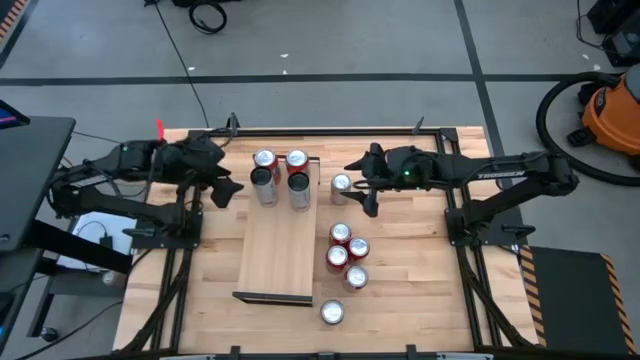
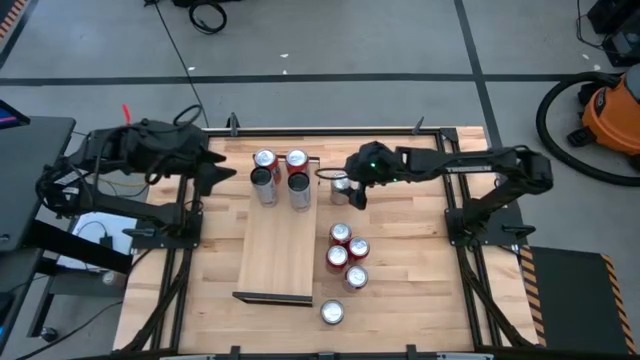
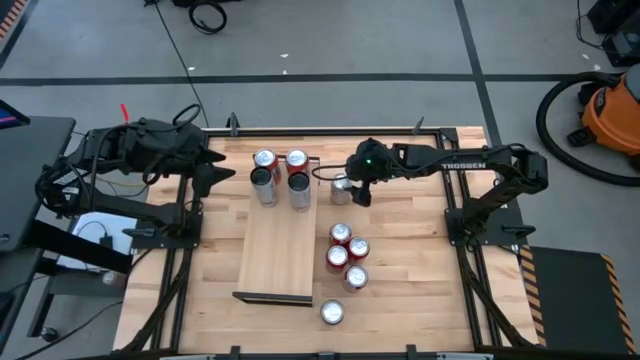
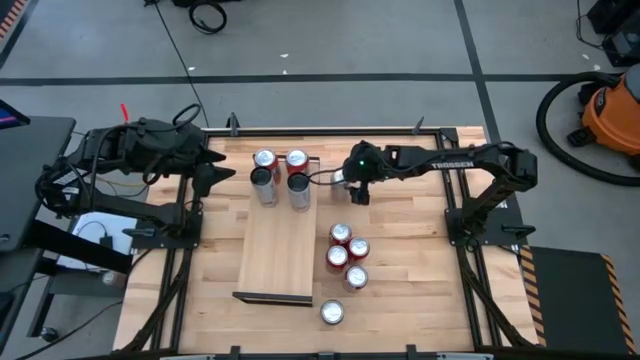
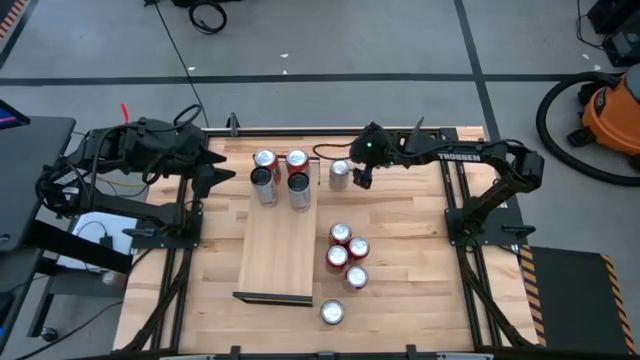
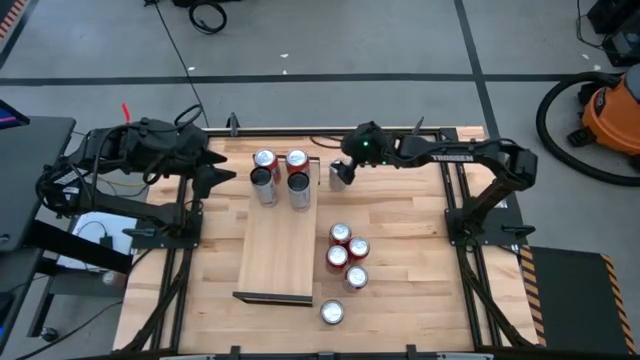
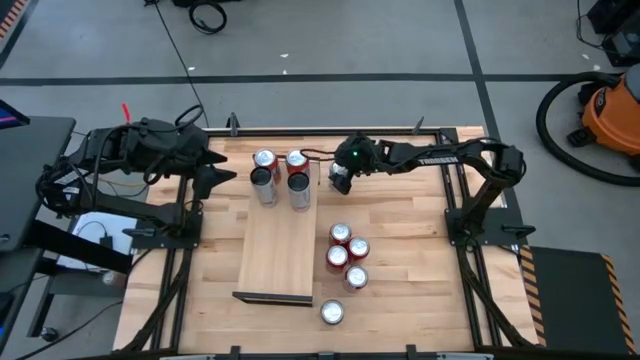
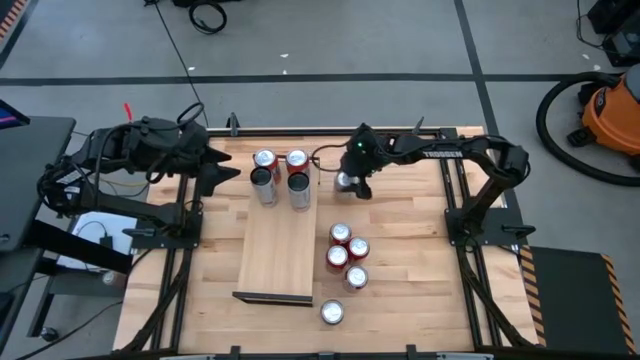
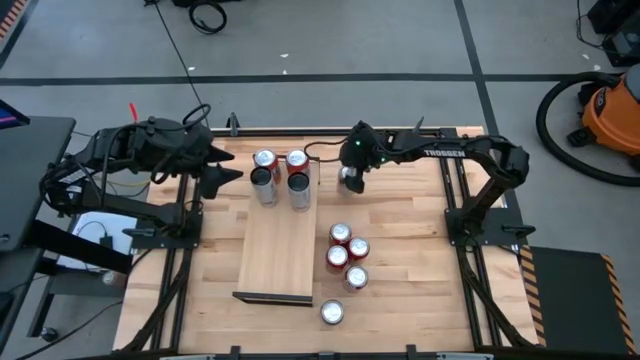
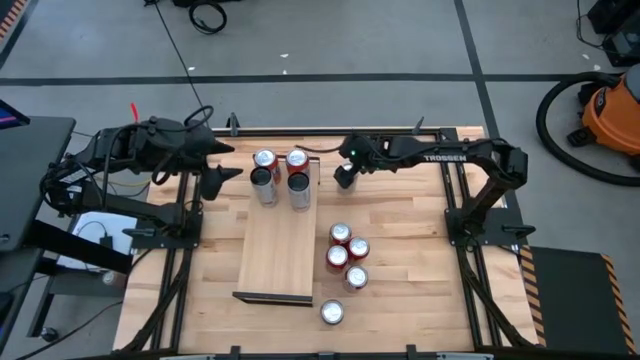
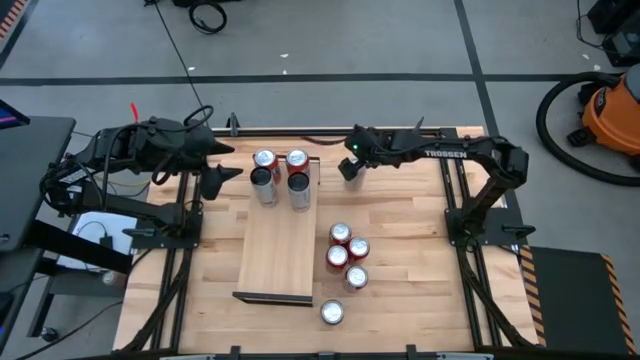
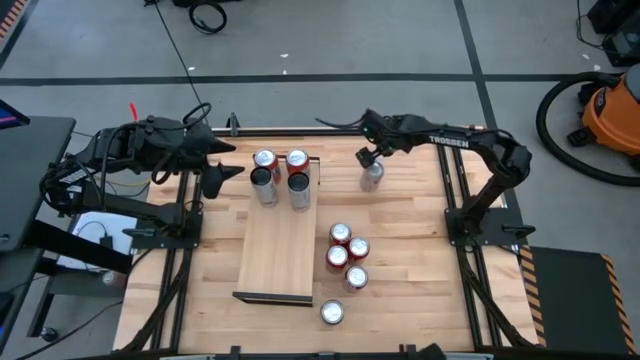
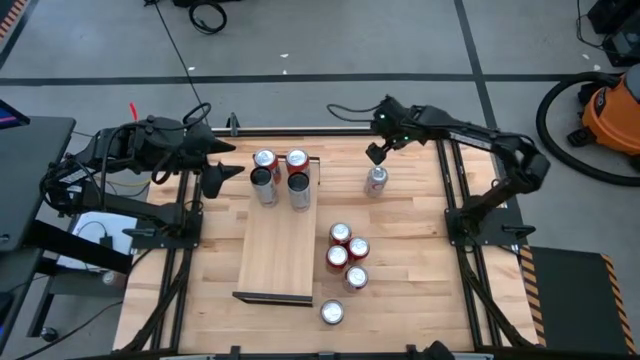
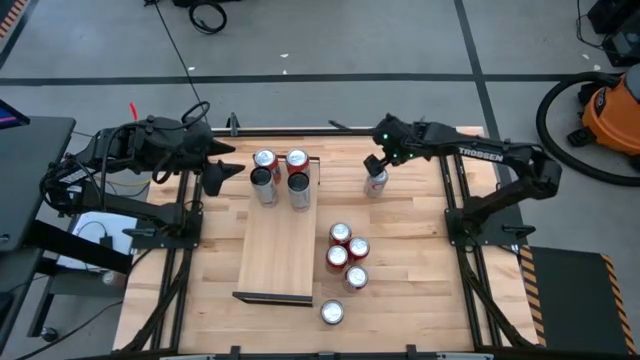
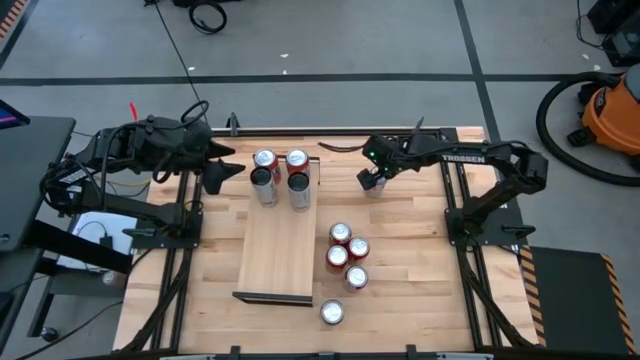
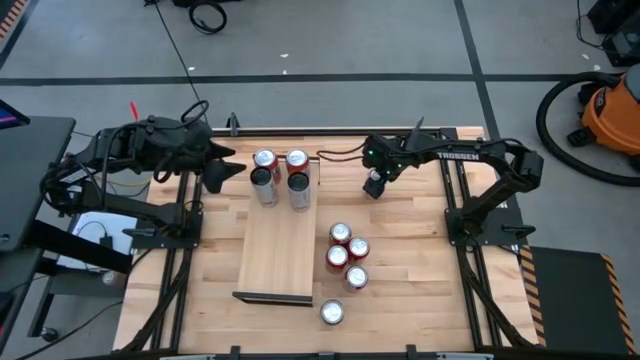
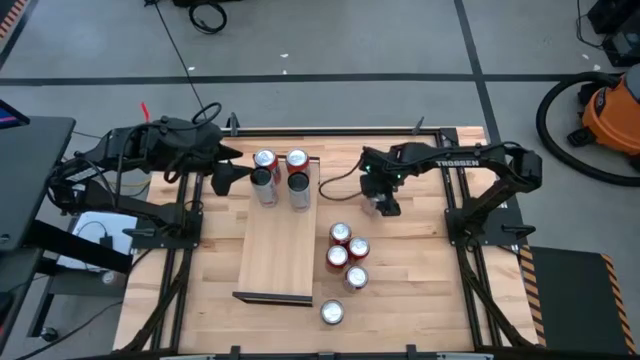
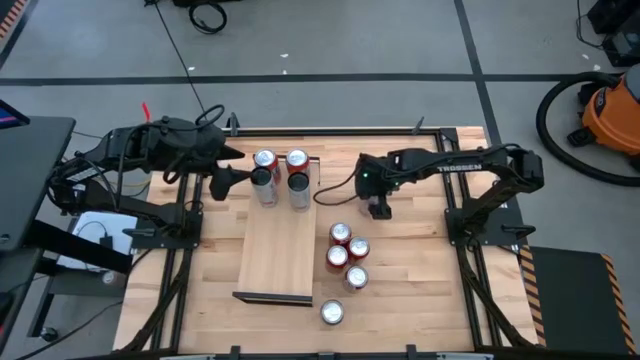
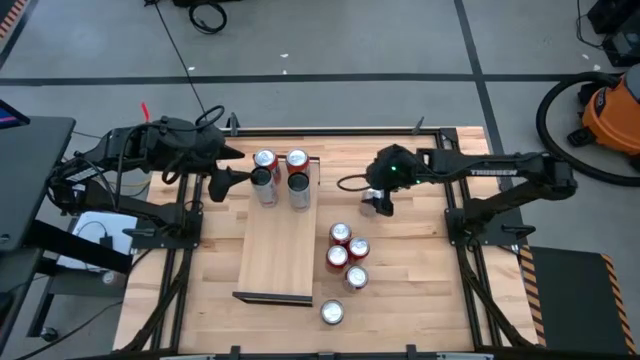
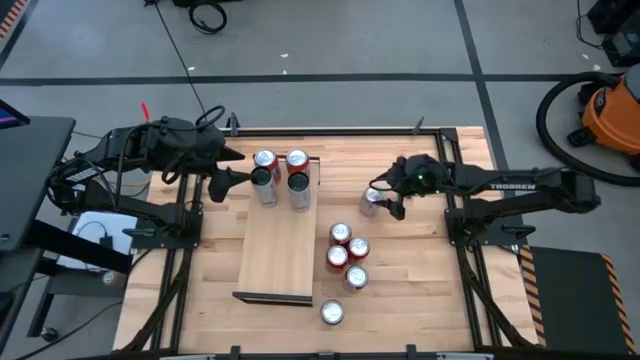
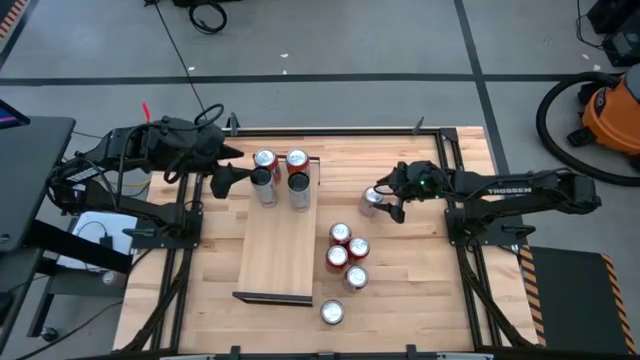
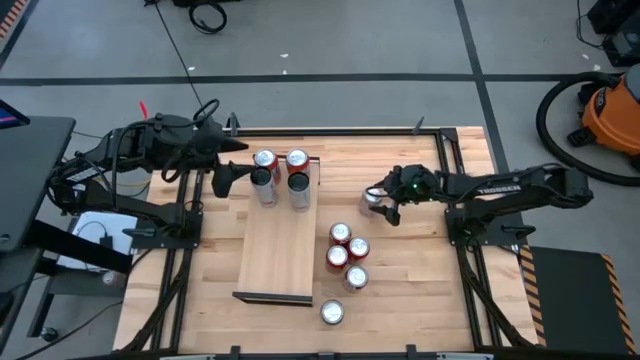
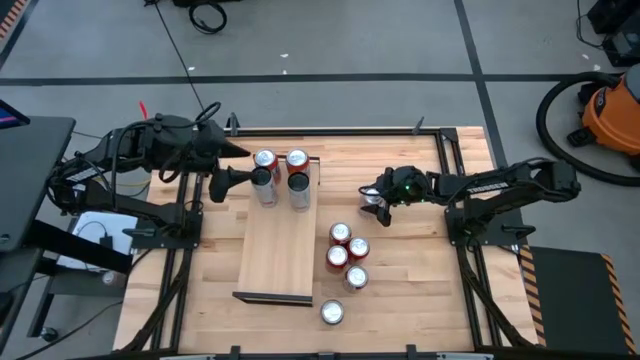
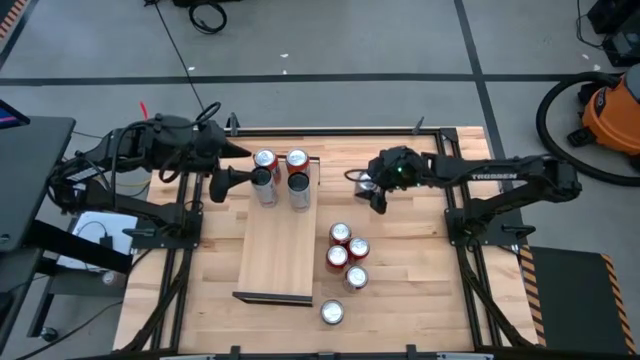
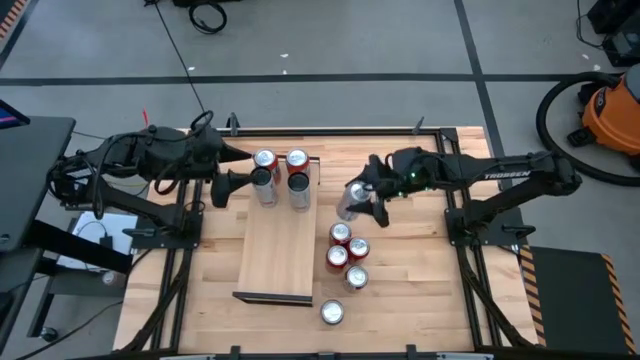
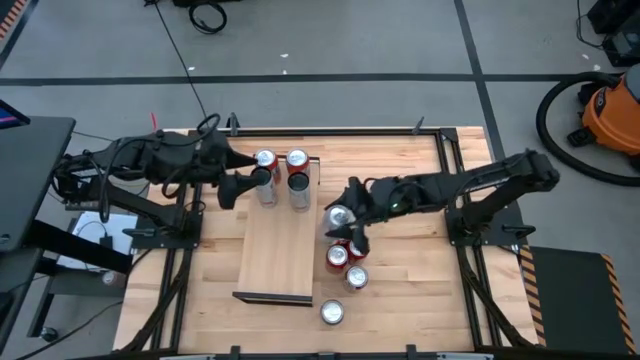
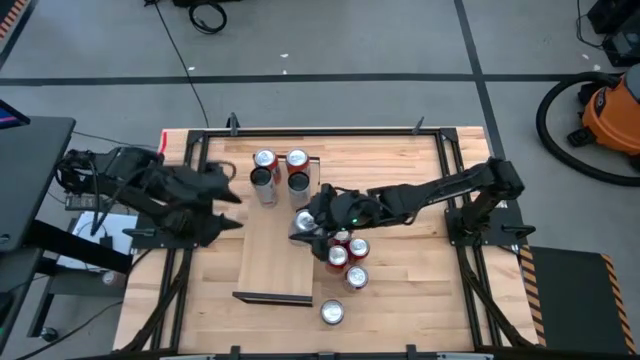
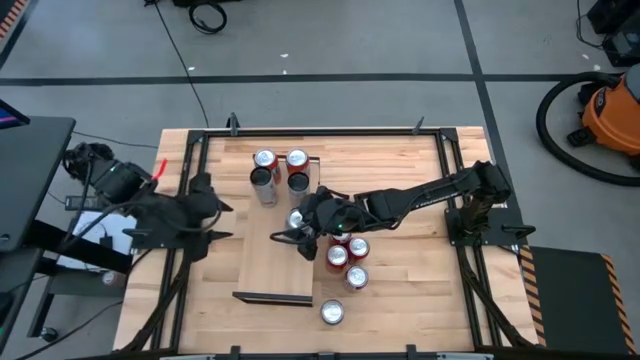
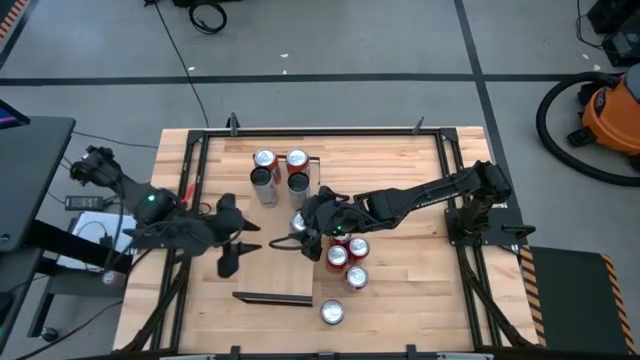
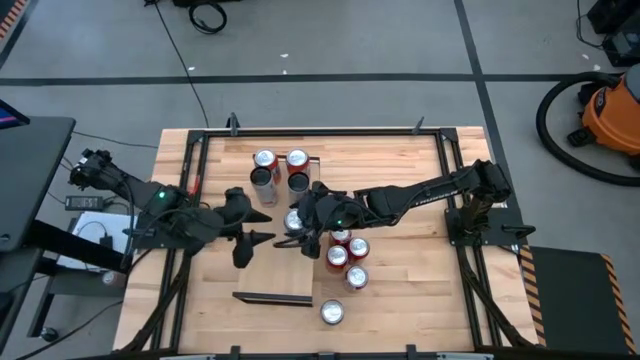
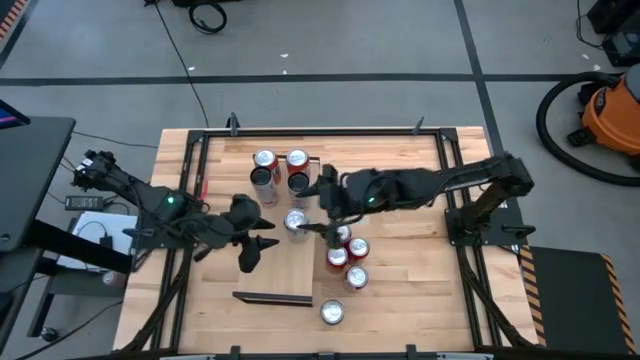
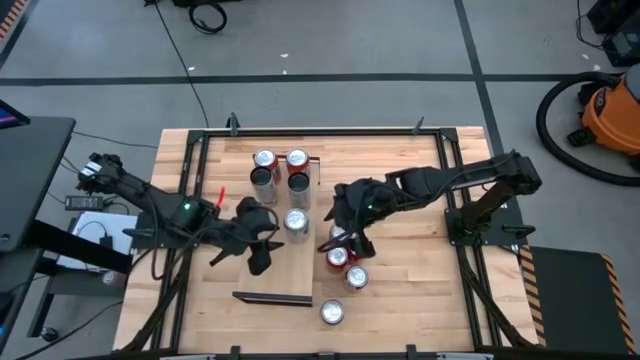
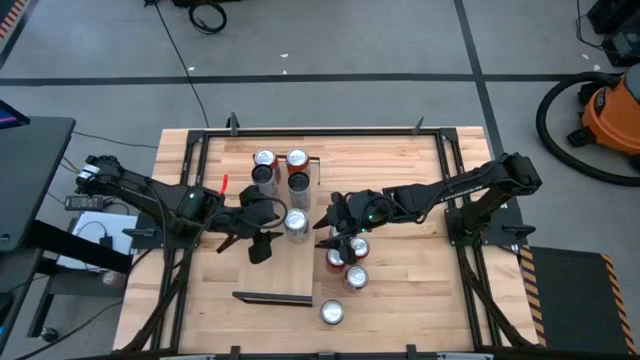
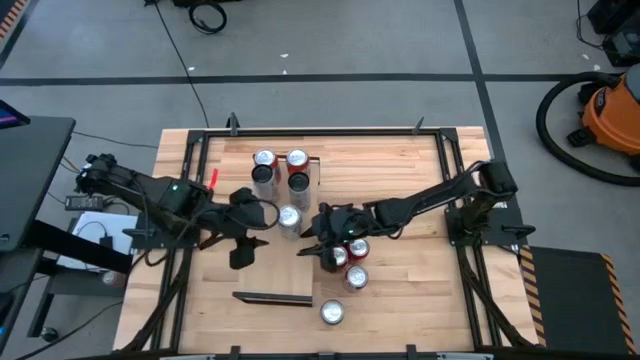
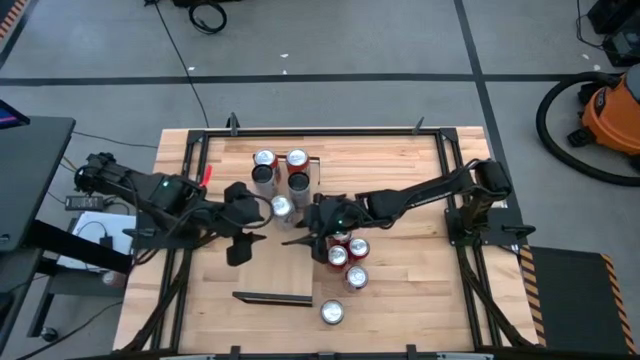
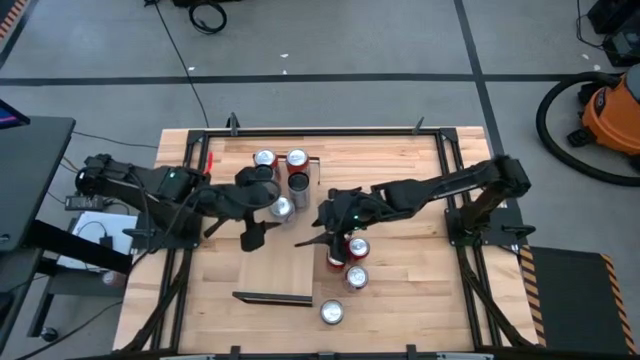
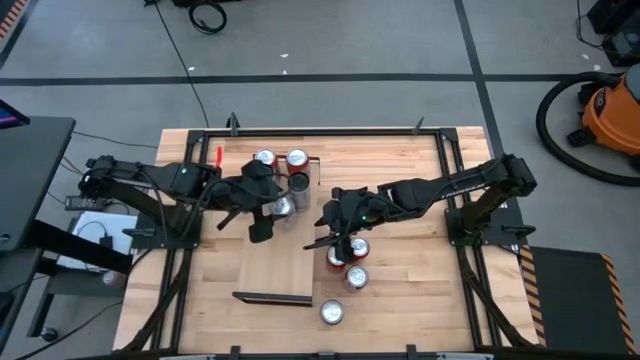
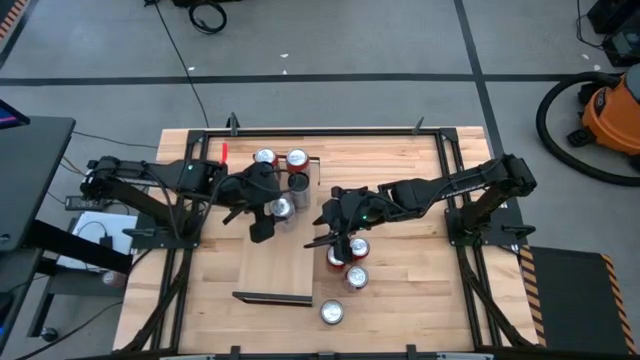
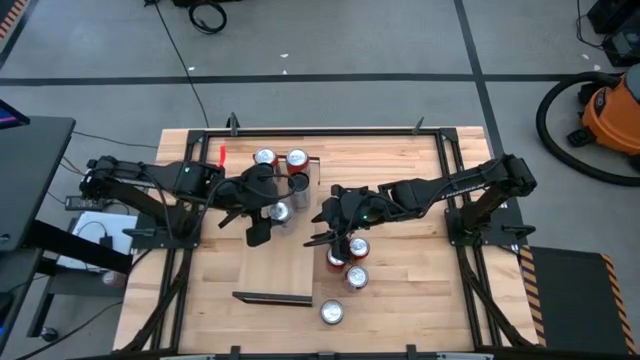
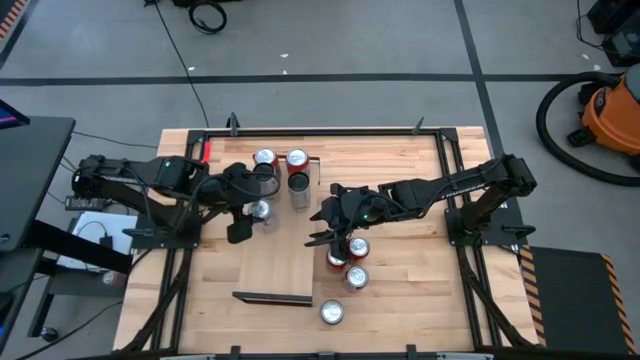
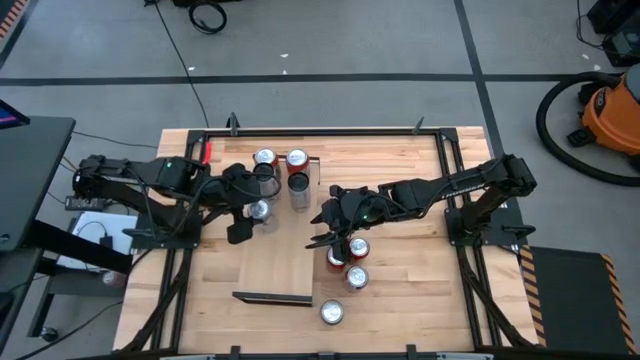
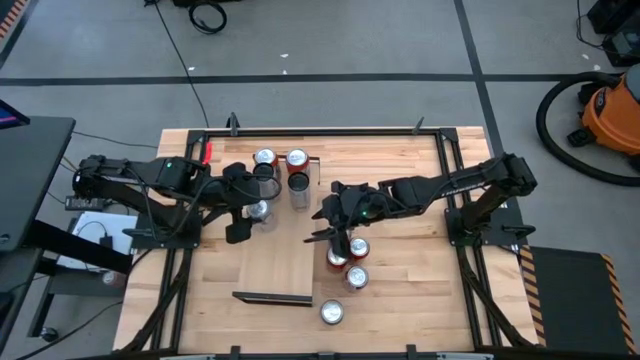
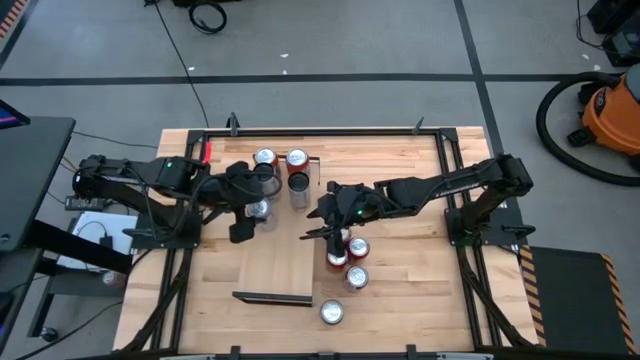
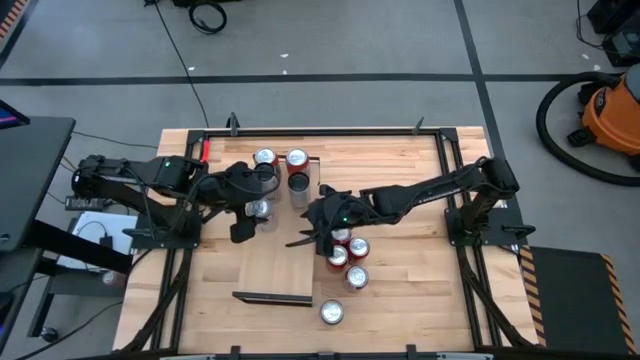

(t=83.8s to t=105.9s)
Task: Place canned beverage on shelf
Put the top red and silver soda can on the shelf

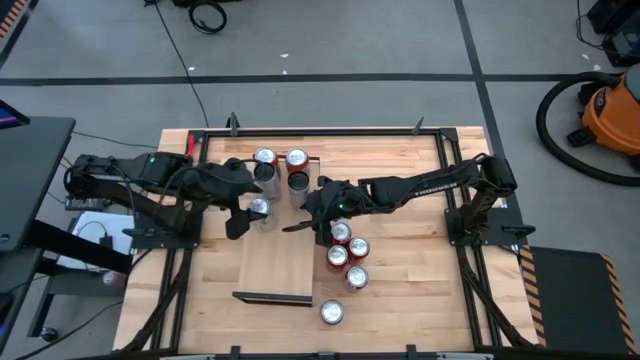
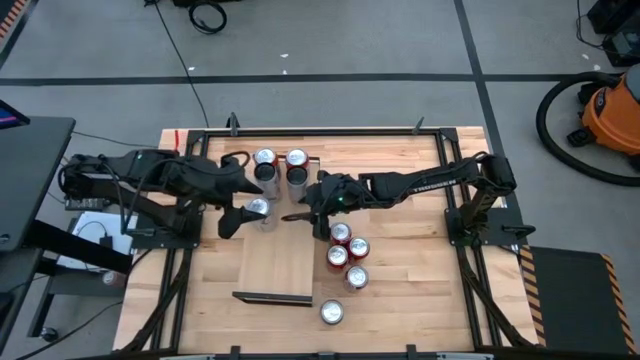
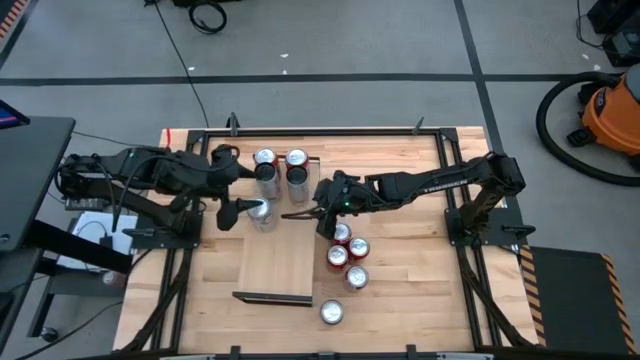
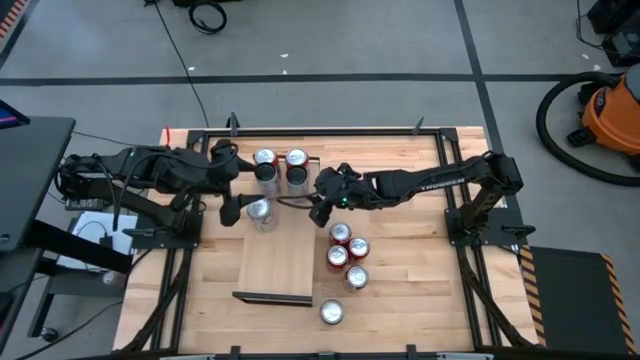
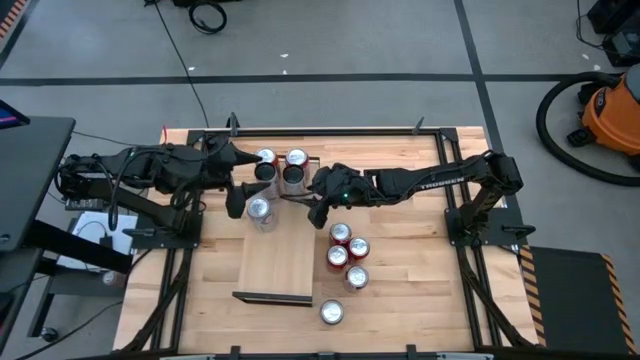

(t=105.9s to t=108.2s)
Adjust the right white and orange soda can
